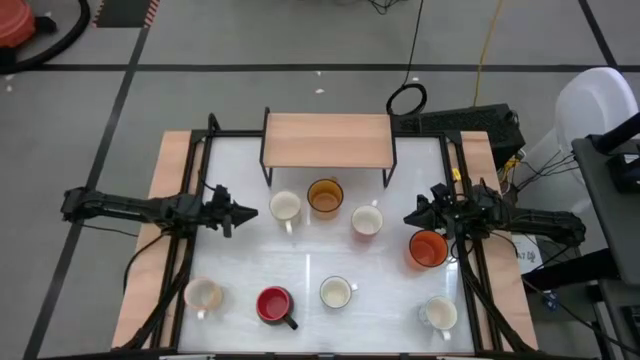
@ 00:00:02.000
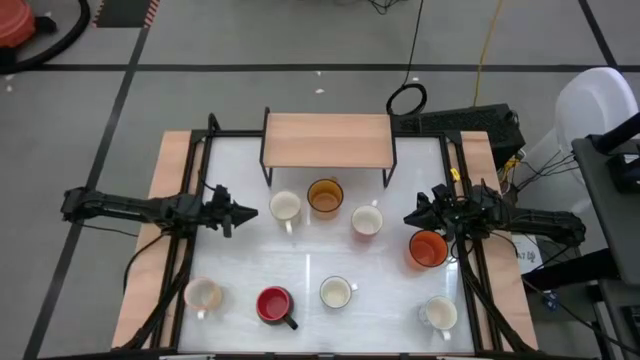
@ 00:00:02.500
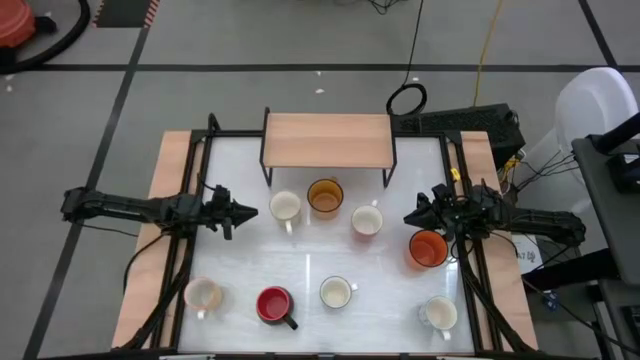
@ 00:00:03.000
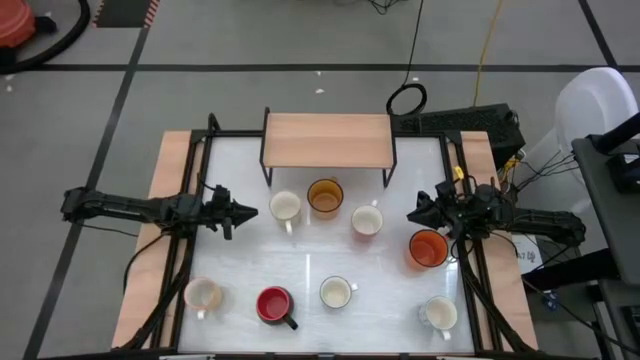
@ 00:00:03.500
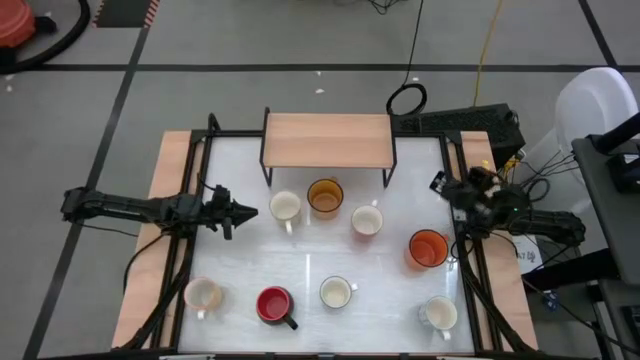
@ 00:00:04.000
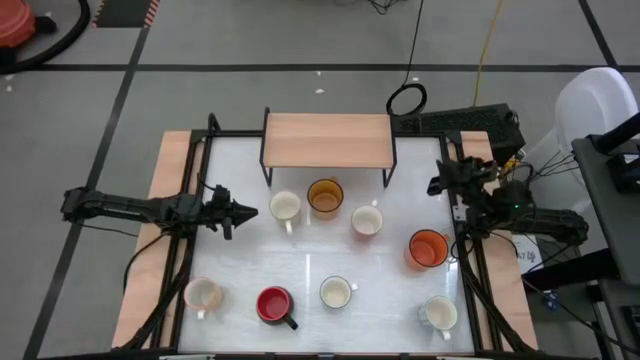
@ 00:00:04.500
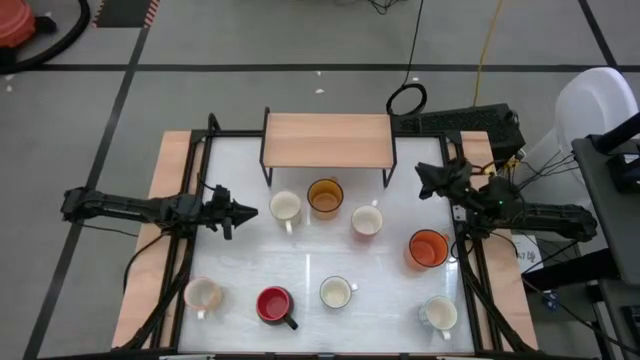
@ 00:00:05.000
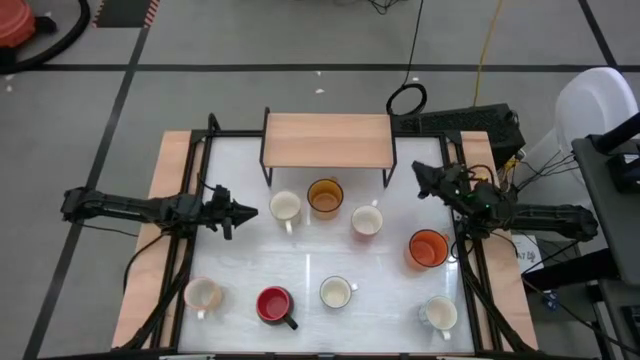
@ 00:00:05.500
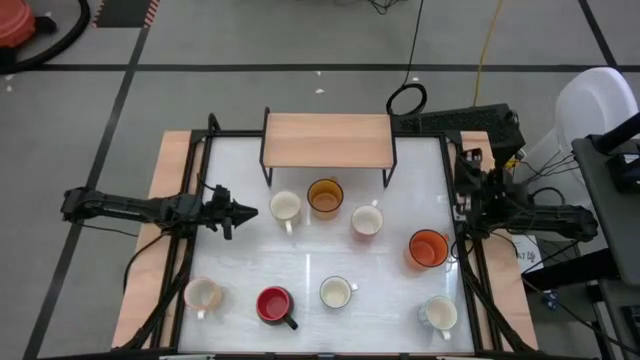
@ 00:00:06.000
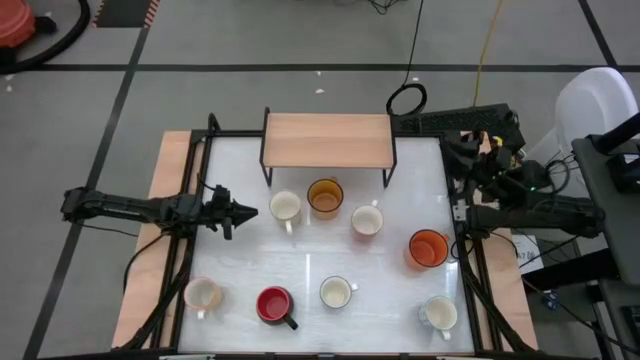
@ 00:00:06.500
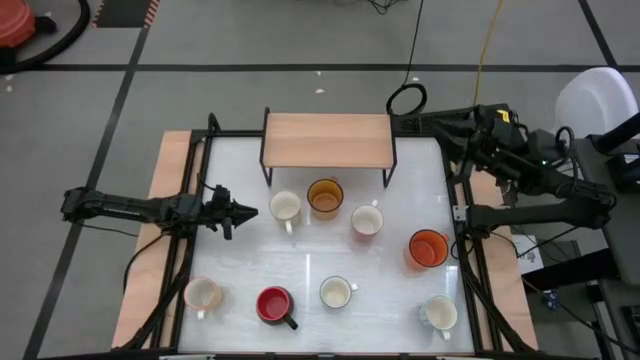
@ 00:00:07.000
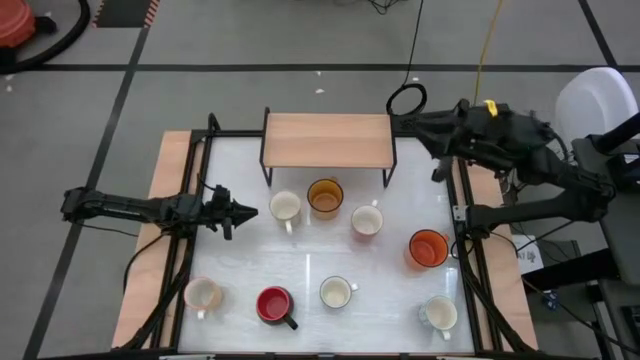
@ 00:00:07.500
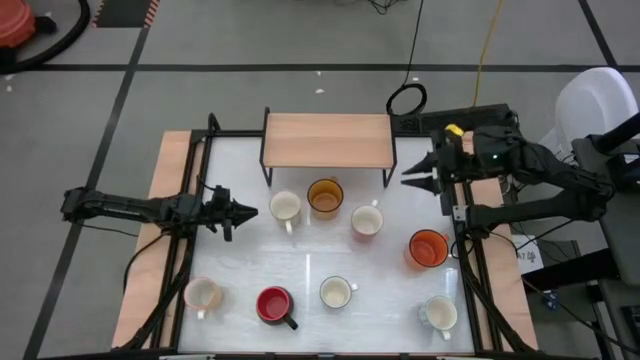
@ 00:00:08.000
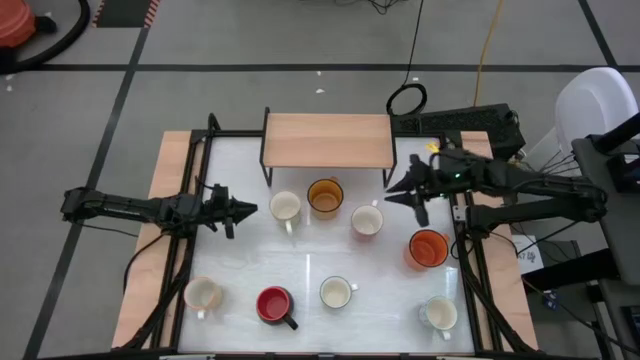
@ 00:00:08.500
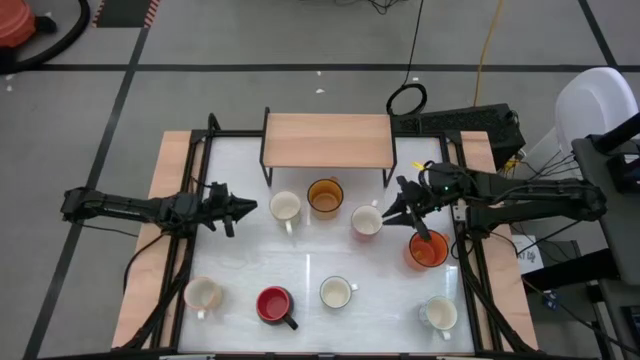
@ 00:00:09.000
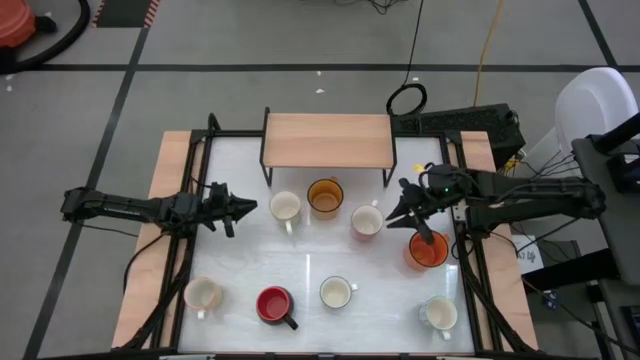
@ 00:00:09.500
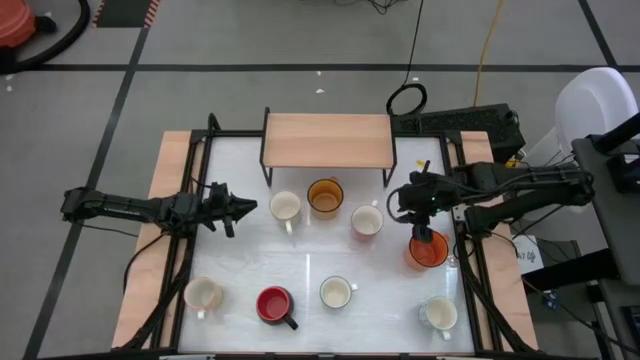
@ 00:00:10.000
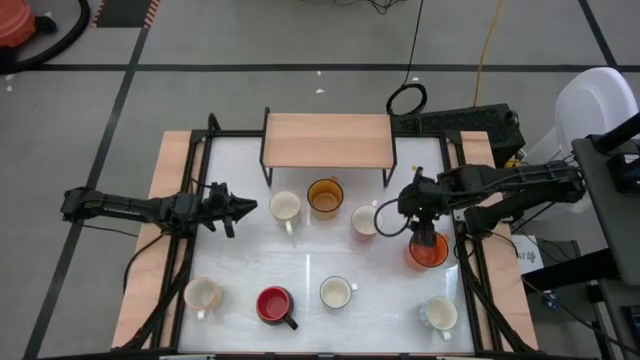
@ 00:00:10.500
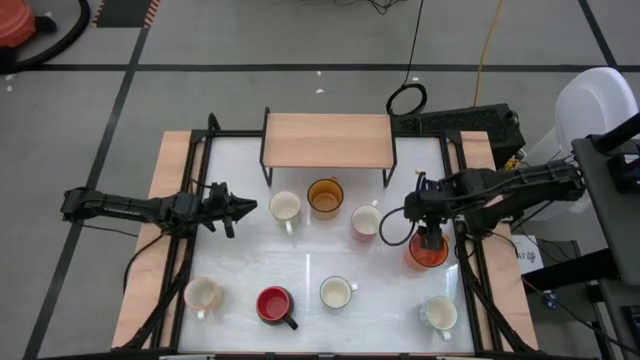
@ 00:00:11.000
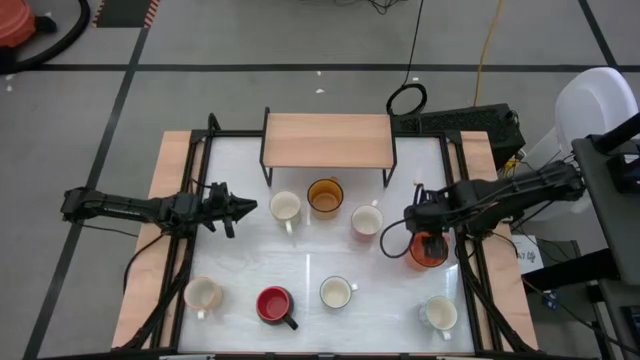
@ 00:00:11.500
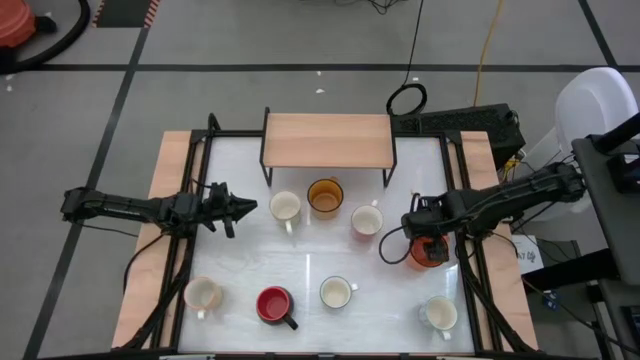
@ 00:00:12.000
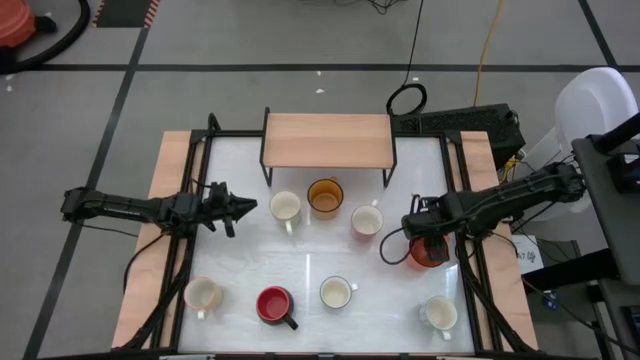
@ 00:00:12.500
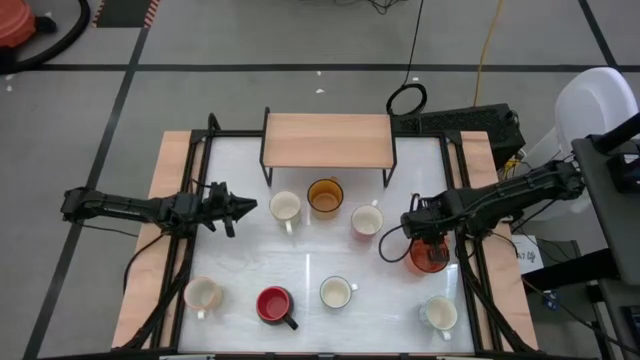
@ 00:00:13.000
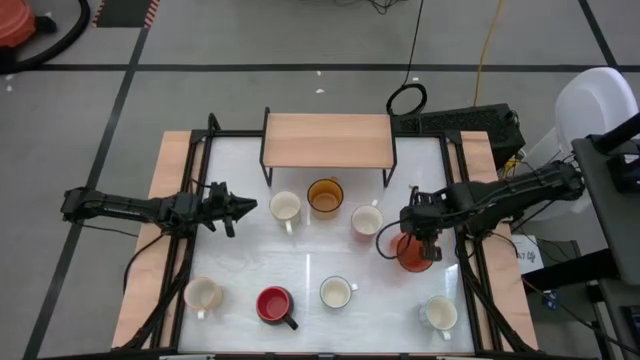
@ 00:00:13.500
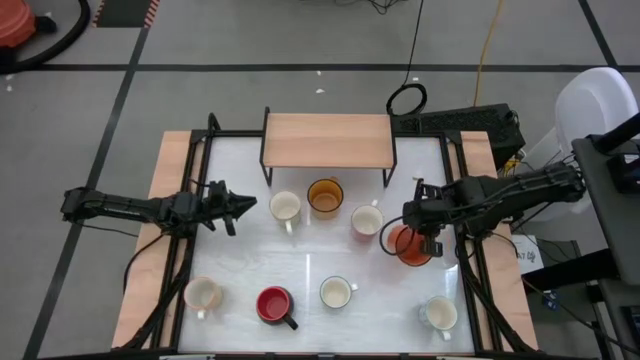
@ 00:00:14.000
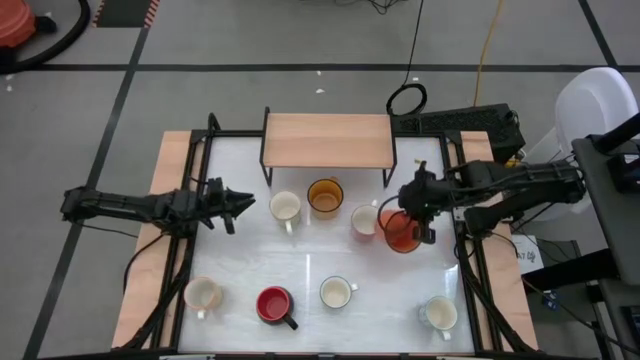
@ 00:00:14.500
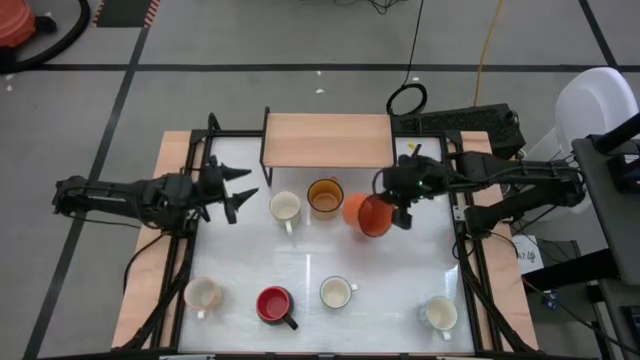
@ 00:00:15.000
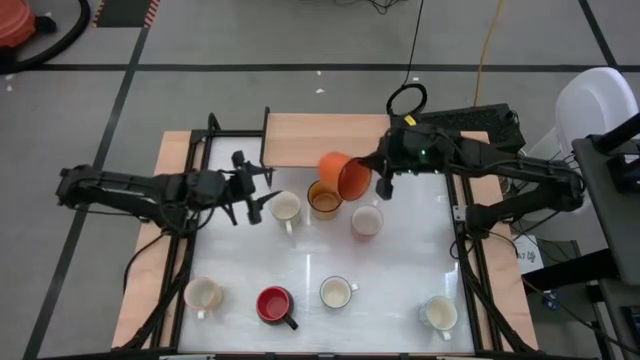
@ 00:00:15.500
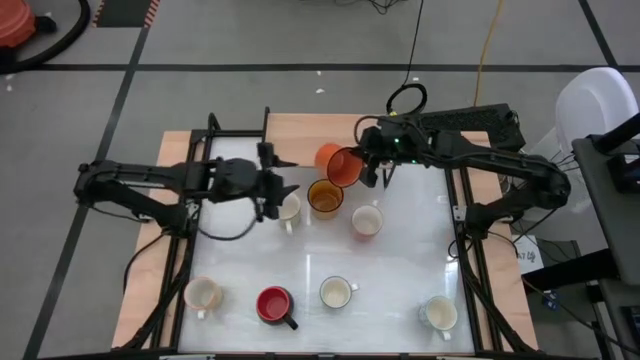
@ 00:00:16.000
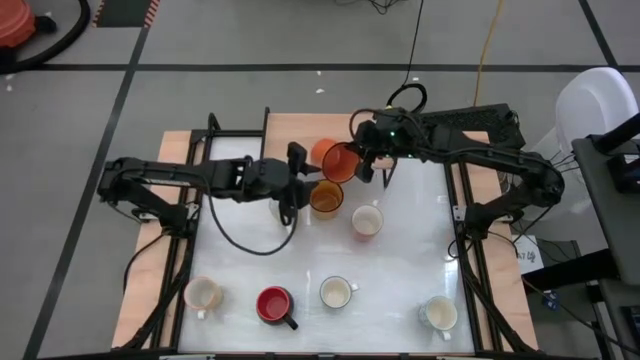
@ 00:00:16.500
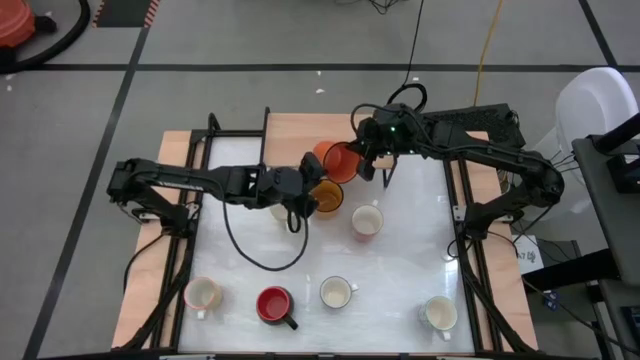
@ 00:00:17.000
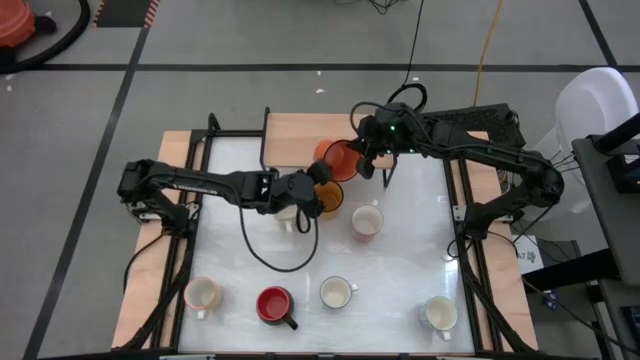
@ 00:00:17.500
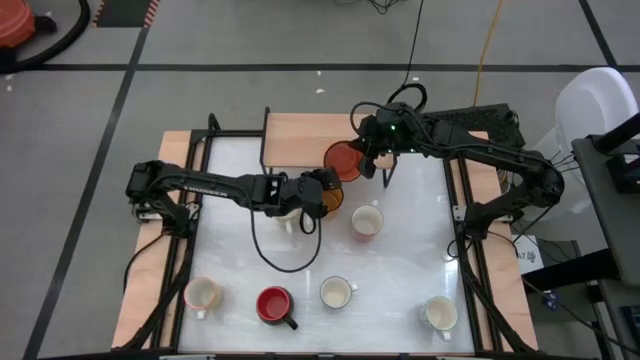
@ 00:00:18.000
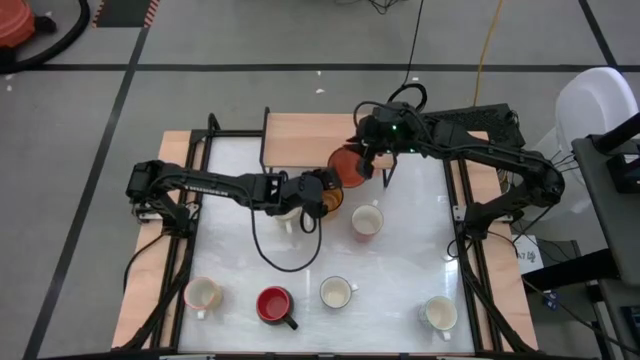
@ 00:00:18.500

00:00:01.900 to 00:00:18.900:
Task: Place coffee mugs
Put the orange mug on the shelf

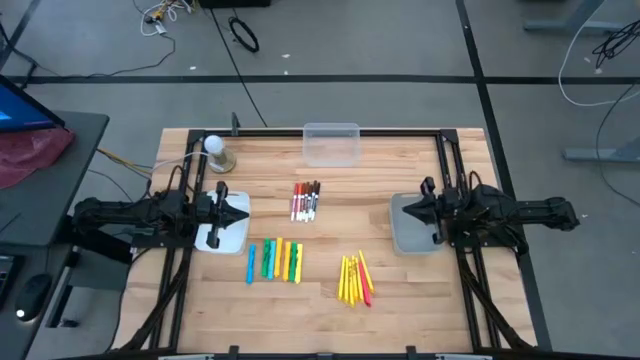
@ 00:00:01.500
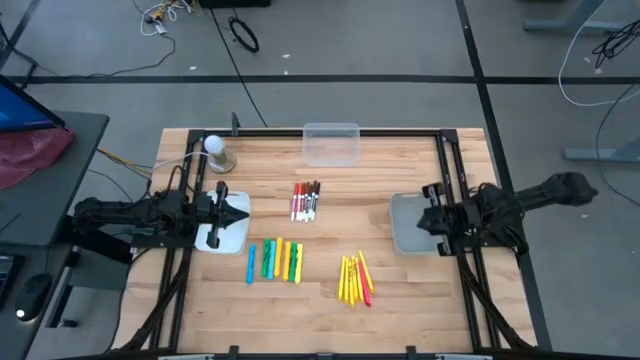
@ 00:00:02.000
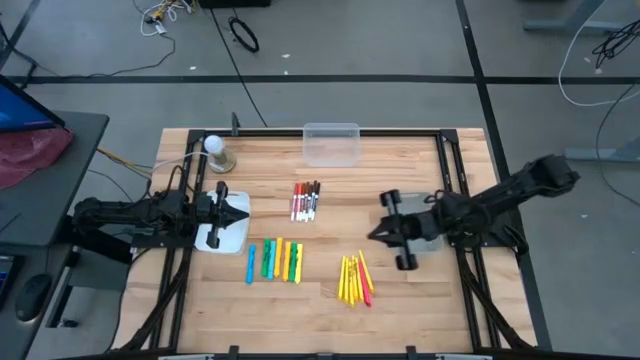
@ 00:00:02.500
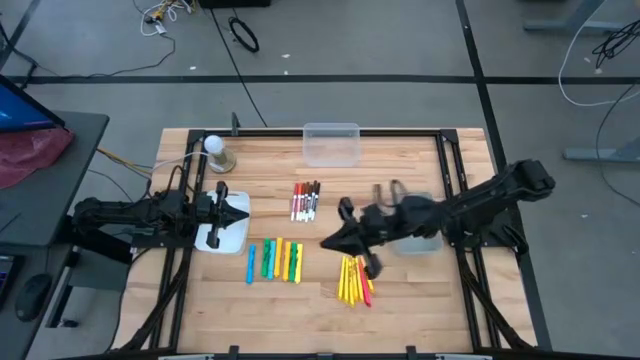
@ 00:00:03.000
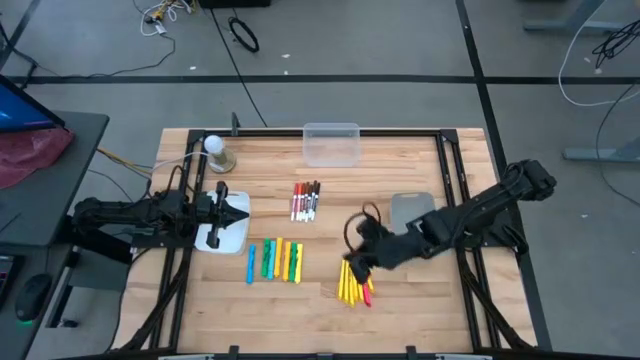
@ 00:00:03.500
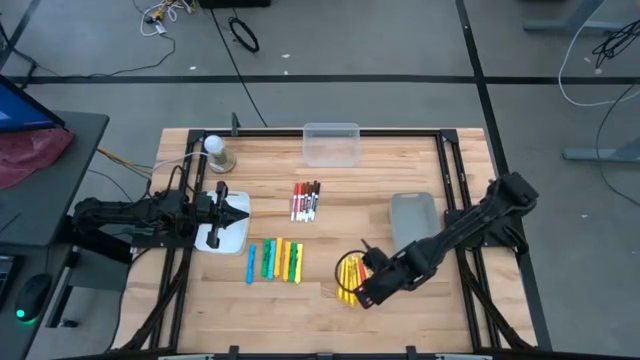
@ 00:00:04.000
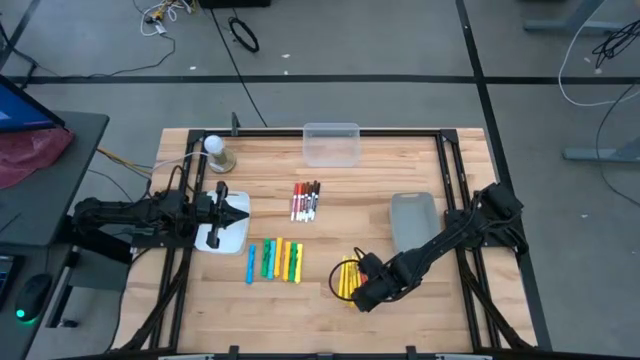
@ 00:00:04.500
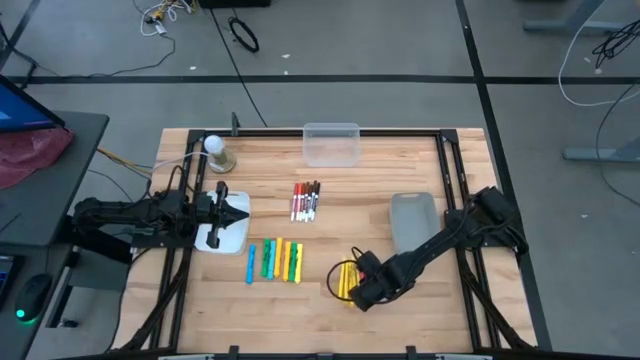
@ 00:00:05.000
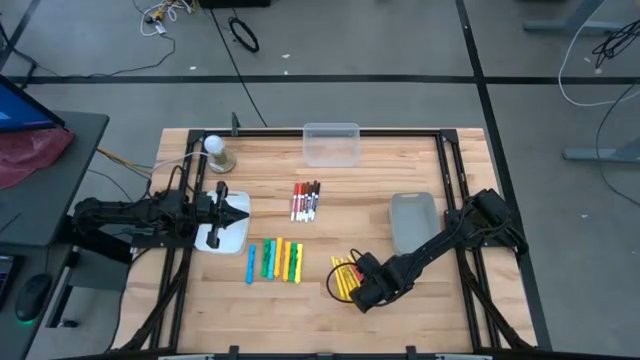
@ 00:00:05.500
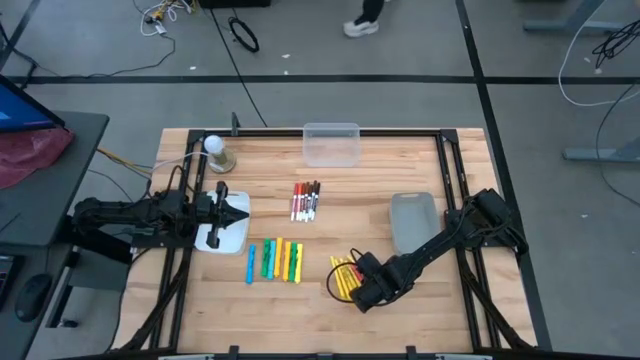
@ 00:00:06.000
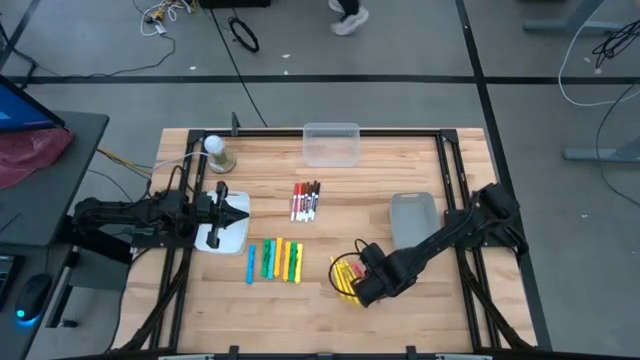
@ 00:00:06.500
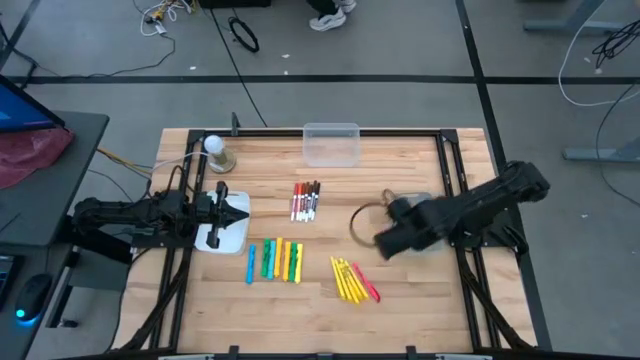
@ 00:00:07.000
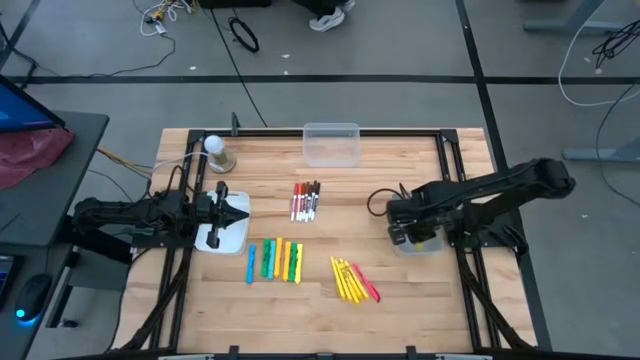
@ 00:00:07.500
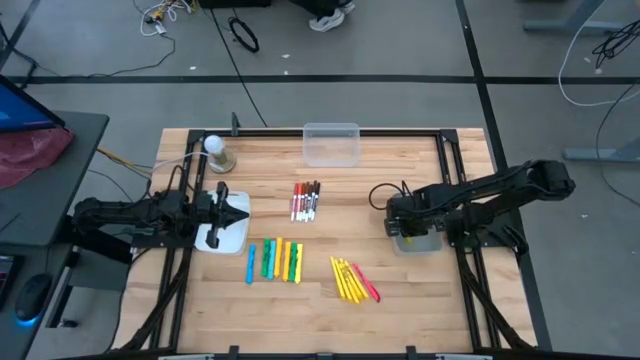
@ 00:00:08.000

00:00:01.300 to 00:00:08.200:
Task: Pick & Place Markers
Put the yellow pen into the gray bin
